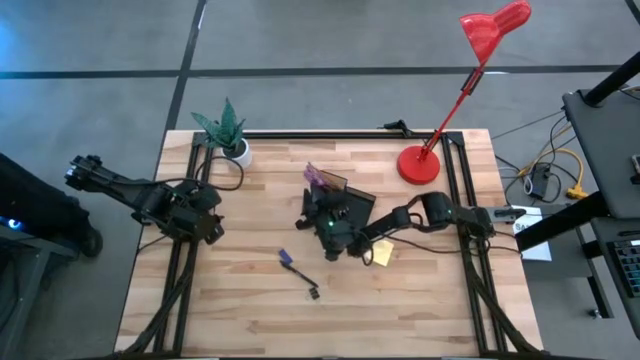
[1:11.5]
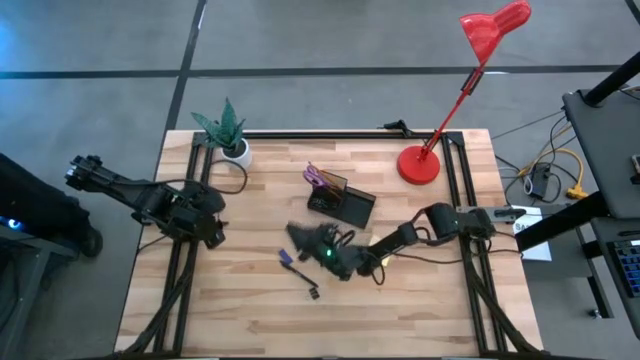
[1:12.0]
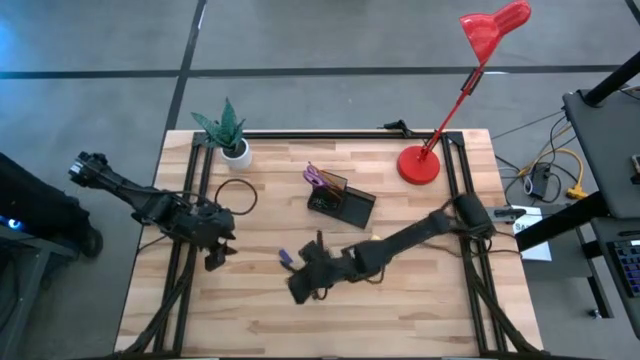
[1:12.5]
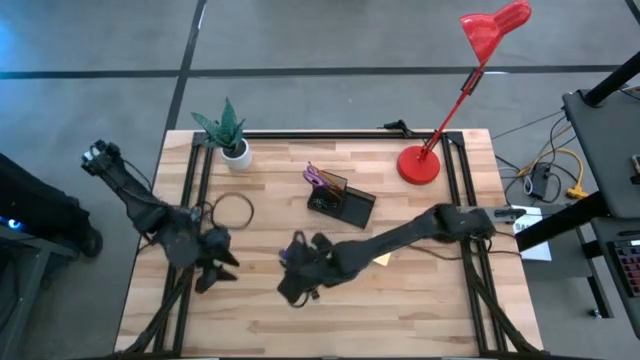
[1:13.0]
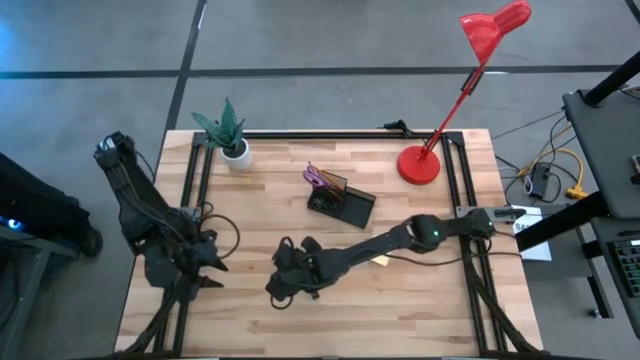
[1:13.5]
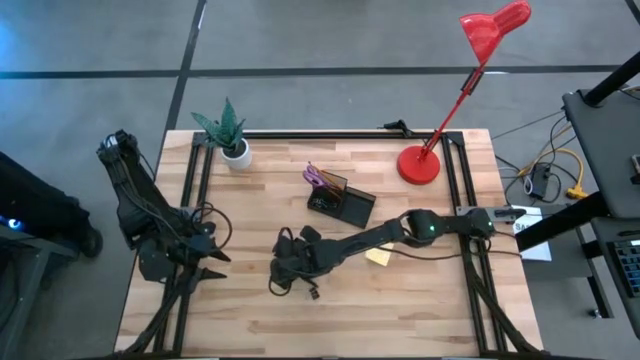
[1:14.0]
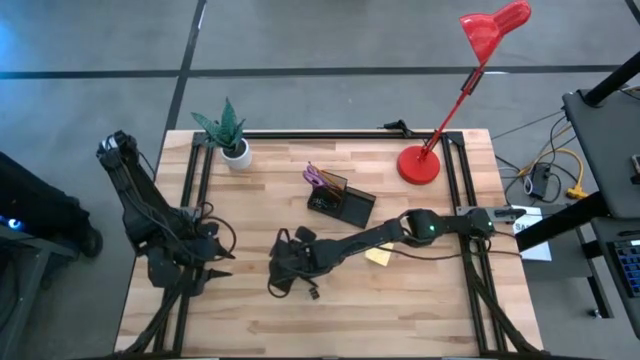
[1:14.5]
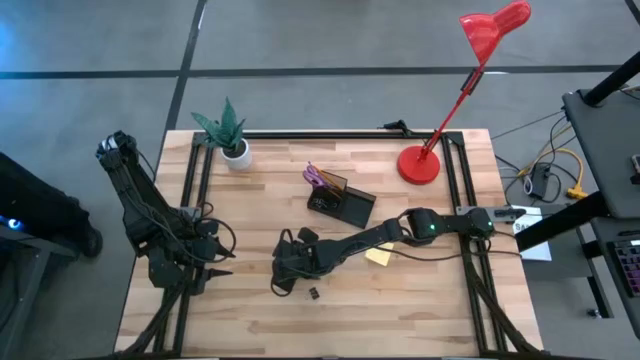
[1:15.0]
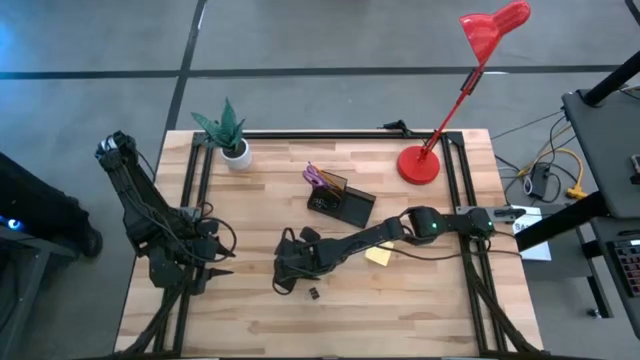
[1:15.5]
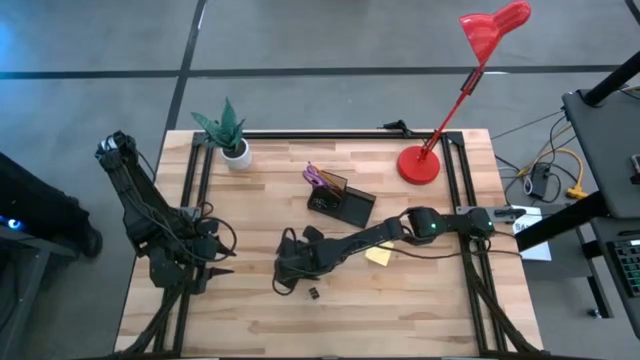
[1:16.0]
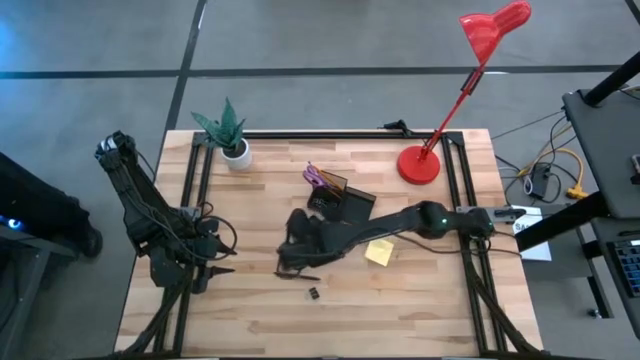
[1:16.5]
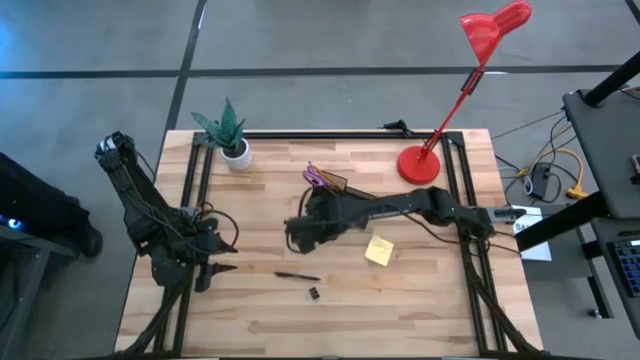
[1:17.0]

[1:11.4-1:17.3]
Task: Pick and place office supplies into organizer
Put the blue eraser into the desk organizer

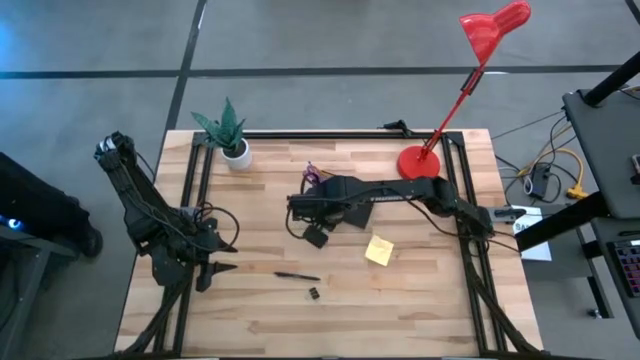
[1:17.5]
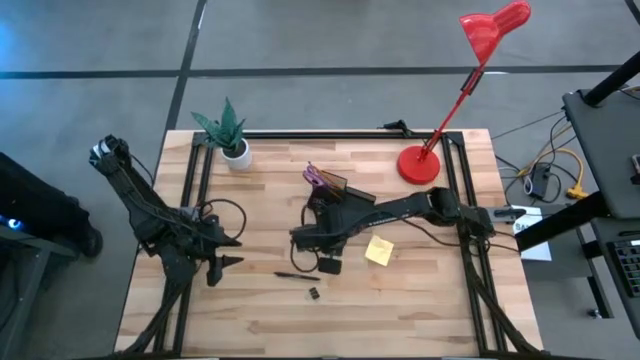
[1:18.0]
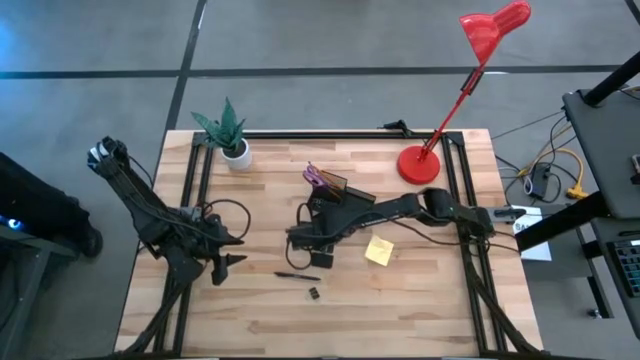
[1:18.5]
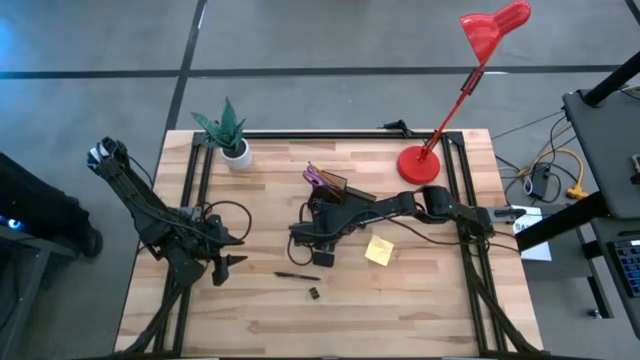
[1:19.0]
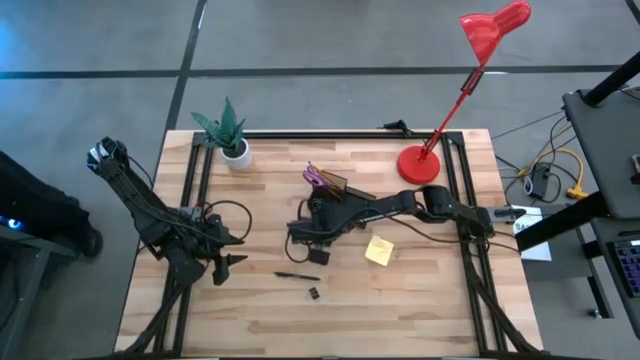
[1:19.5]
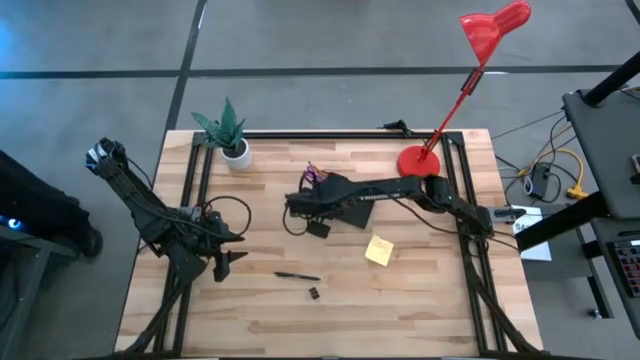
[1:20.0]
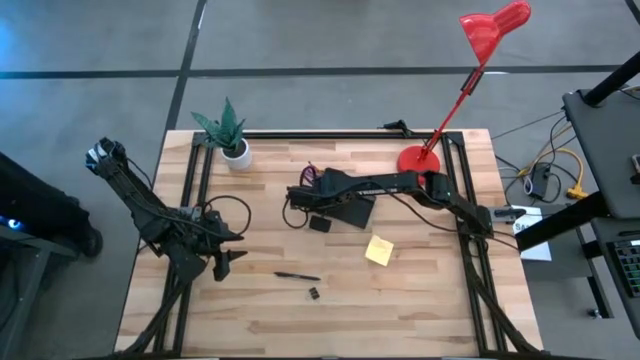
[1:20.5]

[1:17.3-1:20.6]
Put the blue eraser into the desk organizer

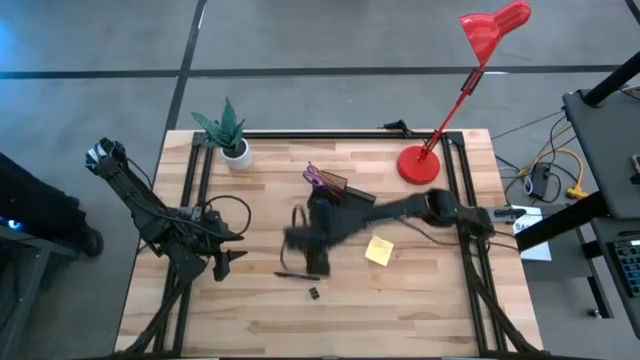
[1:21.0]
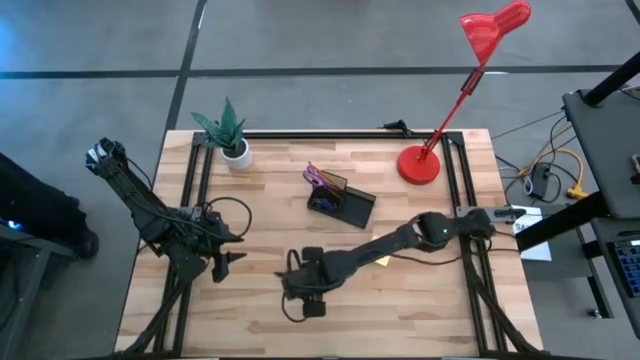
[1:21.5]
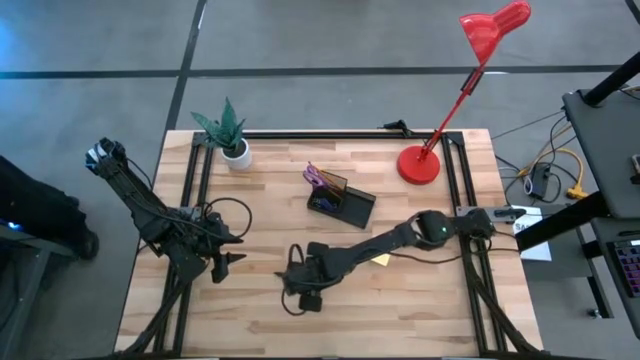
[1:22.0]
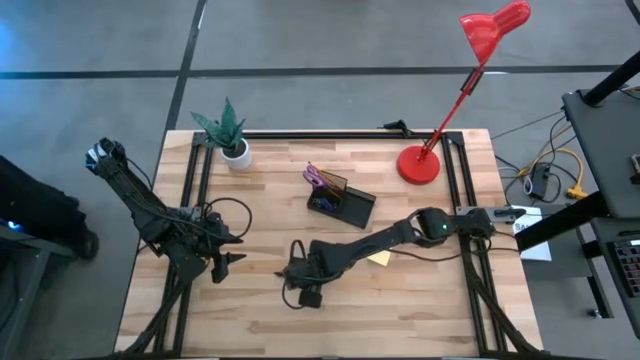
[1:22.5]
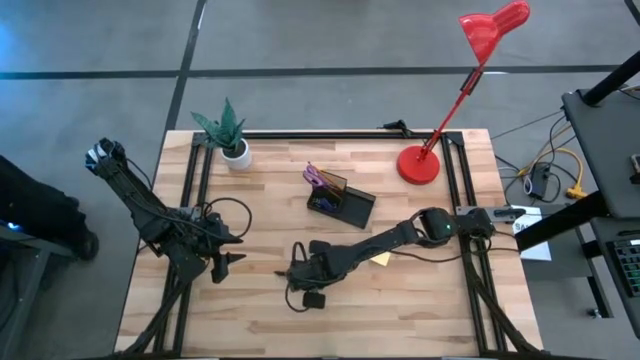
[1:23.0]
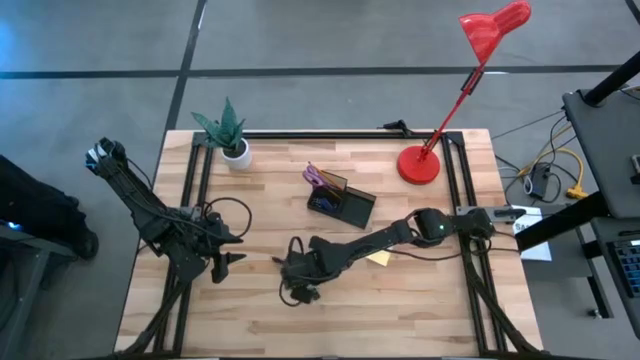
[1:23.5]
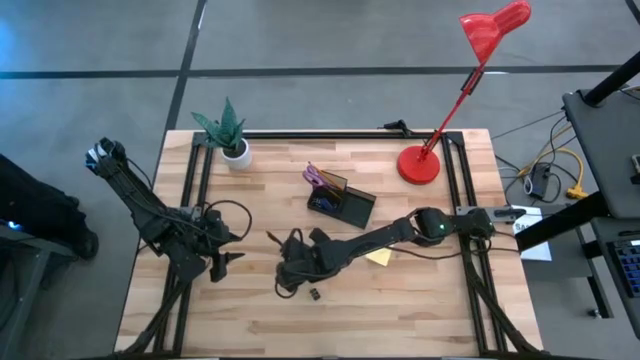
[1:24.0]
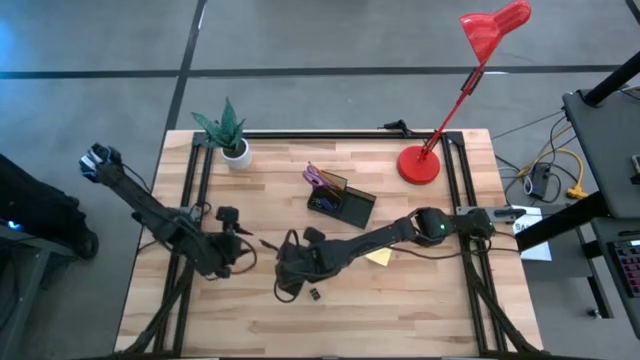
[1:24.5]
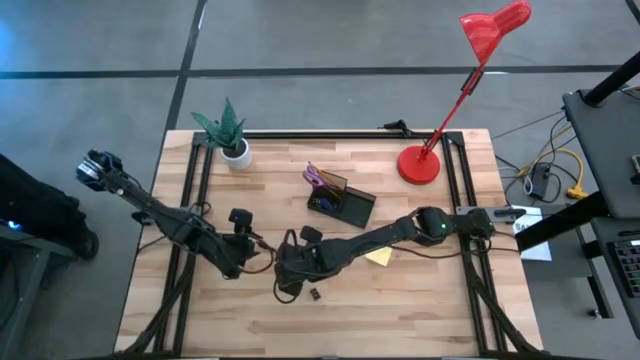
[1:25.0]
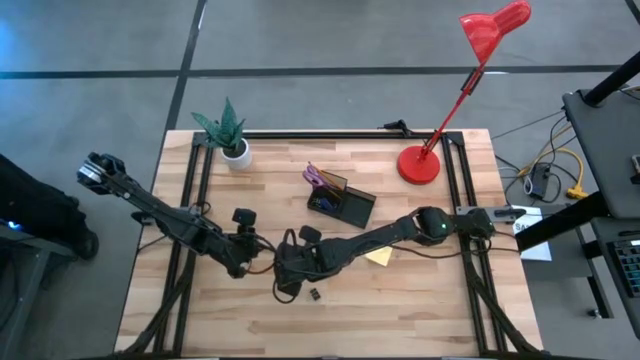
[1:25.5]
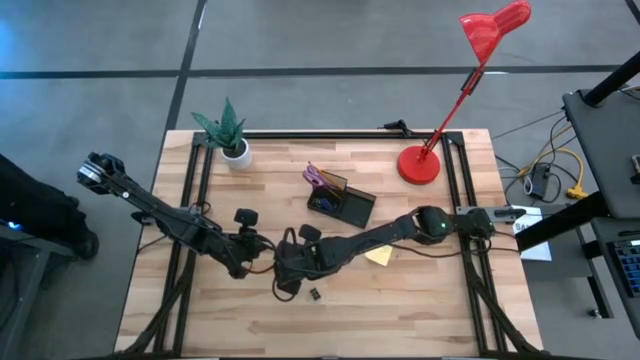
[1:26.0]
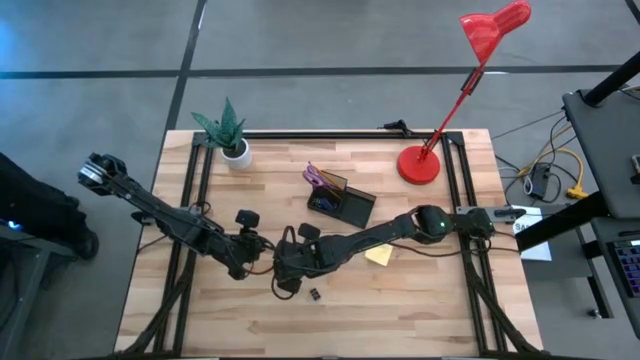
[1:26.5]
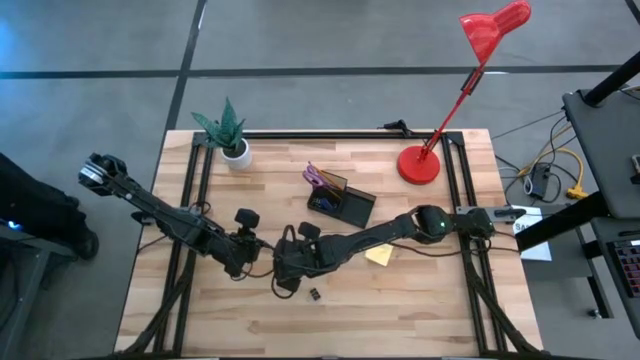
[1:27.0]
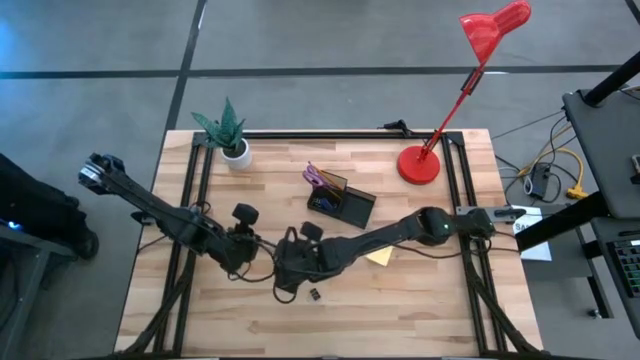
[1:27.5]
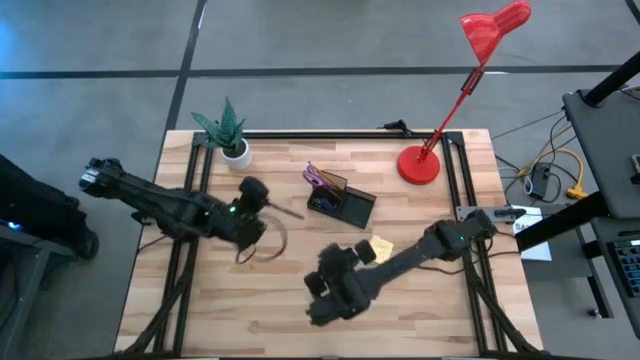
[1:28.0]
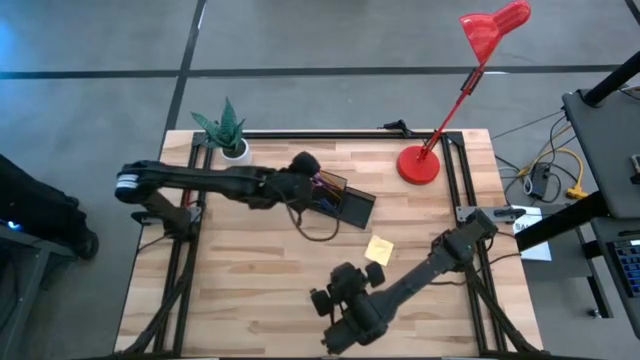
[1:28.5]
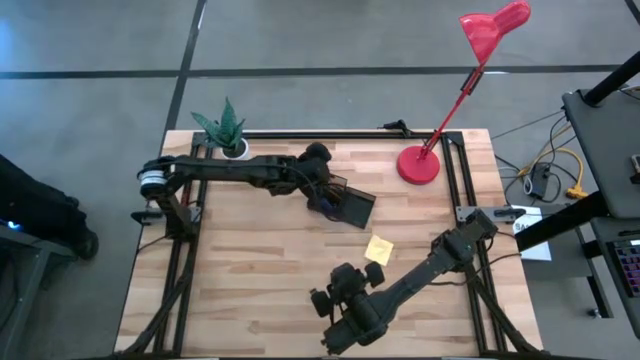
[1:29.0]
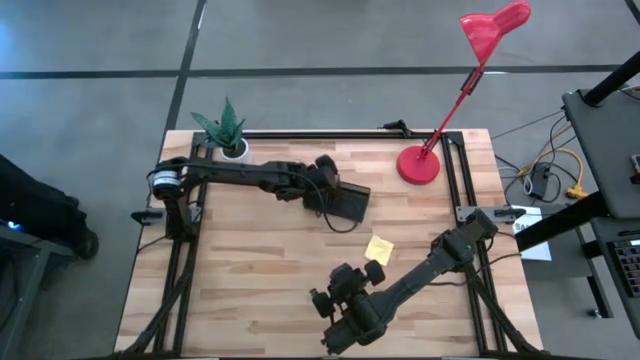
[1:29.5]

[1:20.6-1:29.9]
Put the black pen into the desk organizer

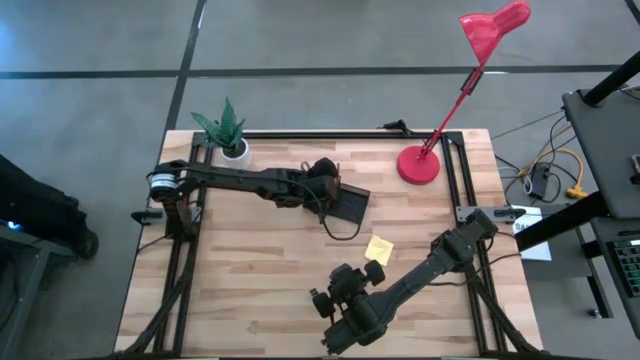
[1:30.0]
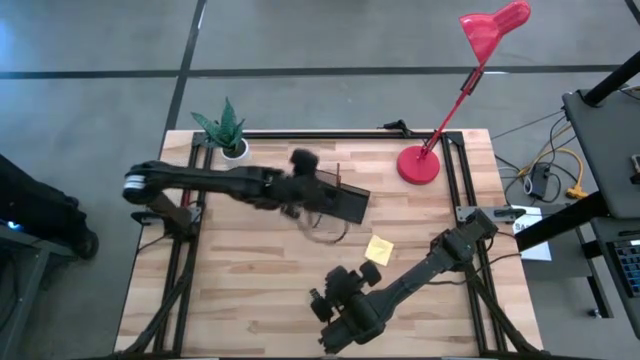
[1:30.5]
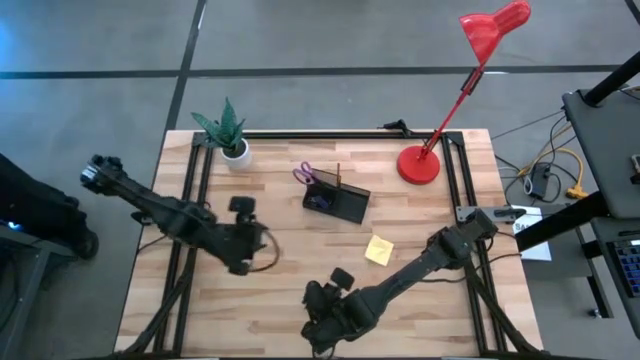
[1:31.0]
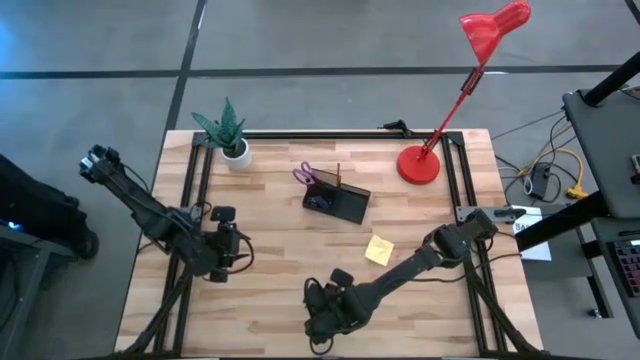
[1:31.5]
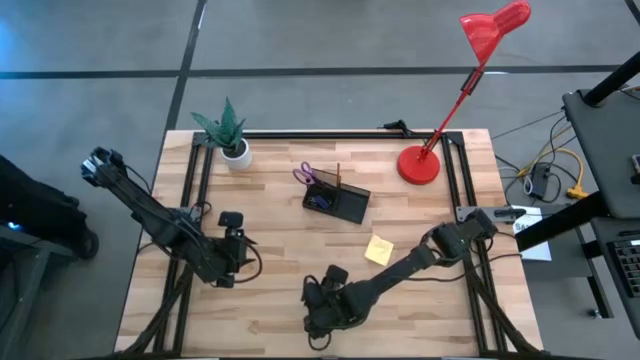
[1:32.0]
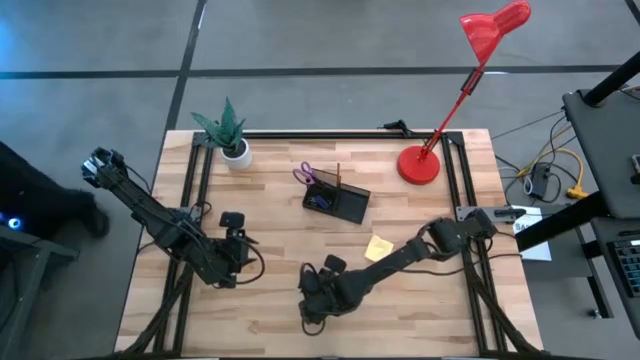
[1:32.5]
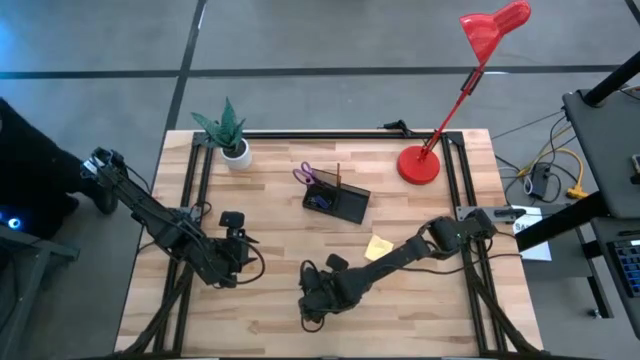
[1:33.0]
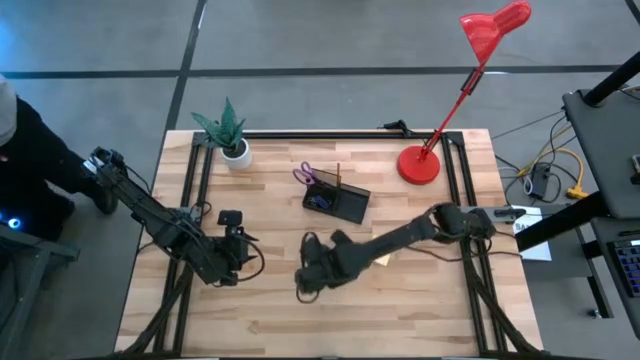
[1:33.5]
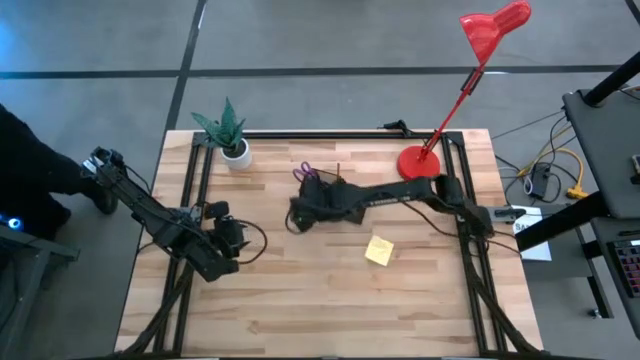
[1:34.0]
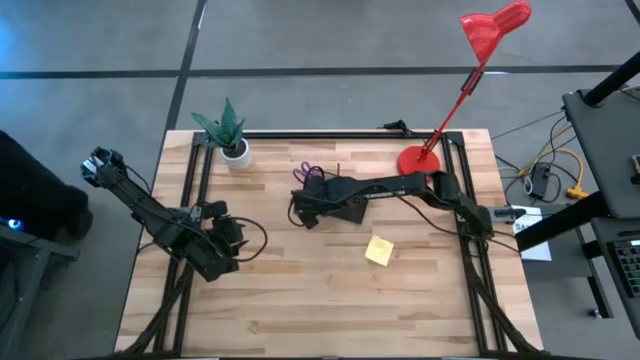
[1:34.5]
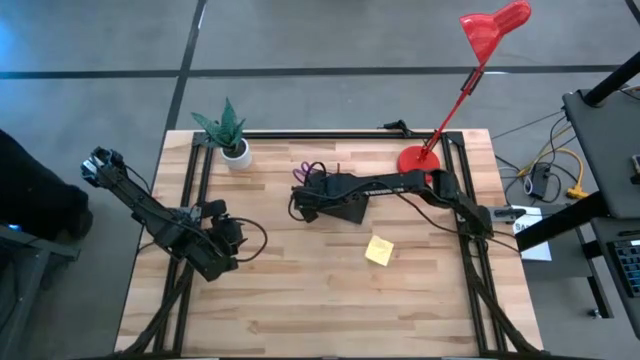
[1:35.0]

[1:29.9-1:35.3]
Put the black binder clip into the desk organizer
